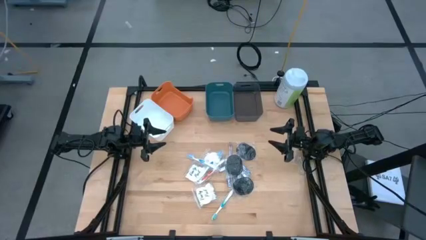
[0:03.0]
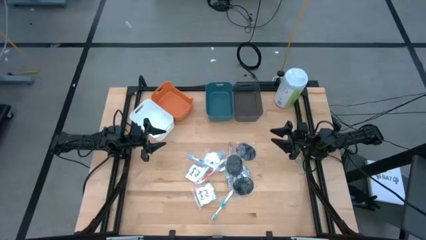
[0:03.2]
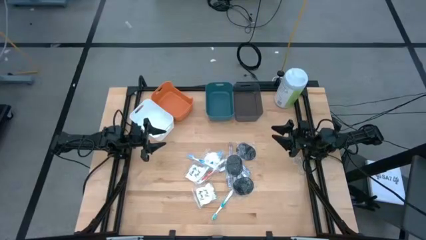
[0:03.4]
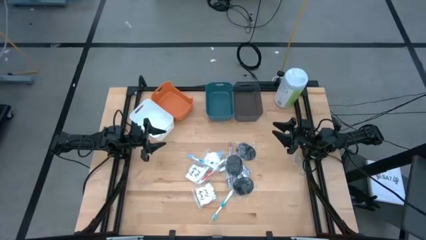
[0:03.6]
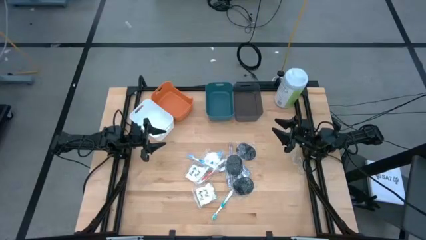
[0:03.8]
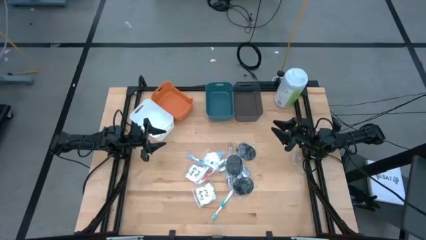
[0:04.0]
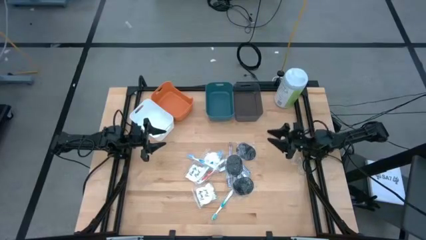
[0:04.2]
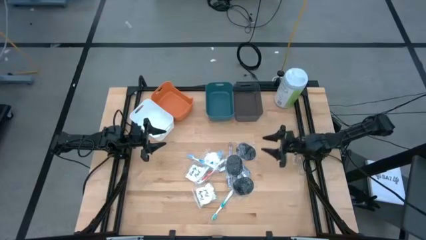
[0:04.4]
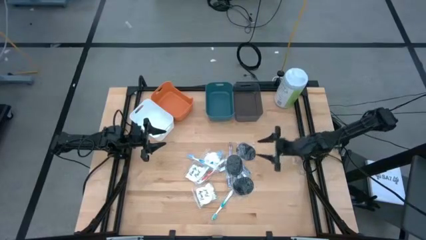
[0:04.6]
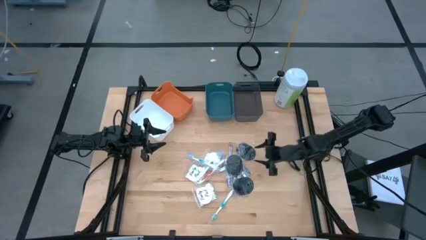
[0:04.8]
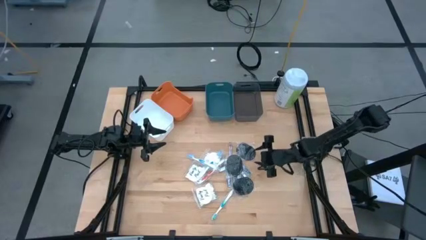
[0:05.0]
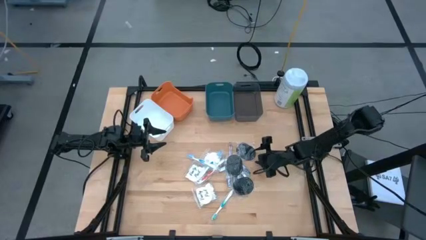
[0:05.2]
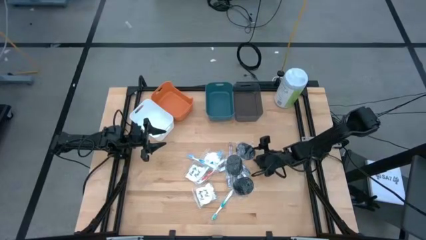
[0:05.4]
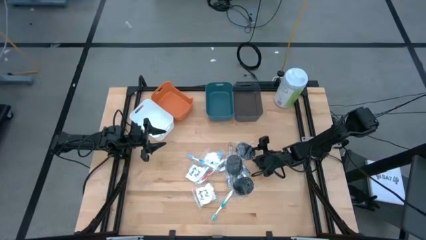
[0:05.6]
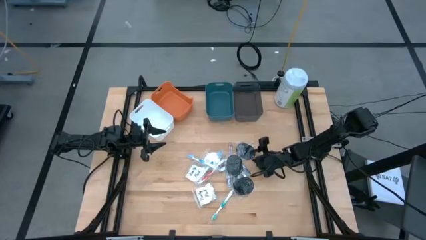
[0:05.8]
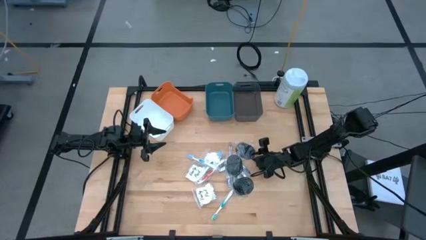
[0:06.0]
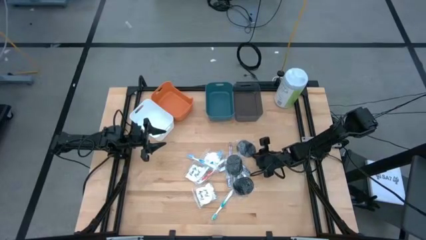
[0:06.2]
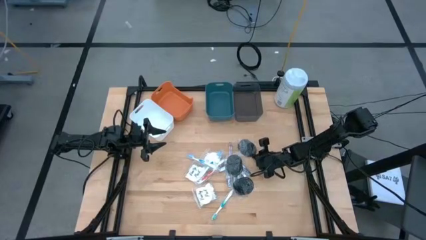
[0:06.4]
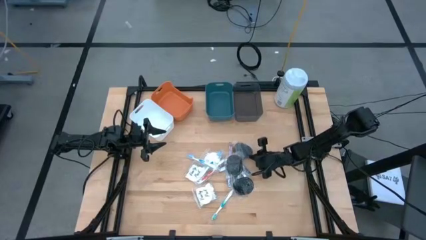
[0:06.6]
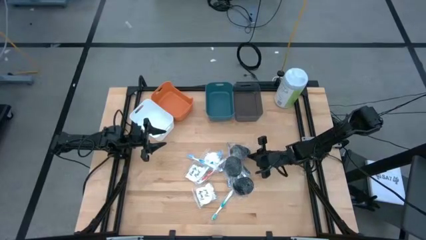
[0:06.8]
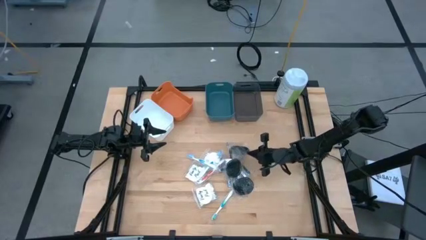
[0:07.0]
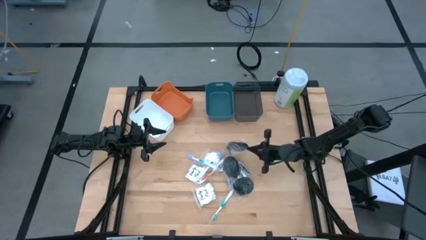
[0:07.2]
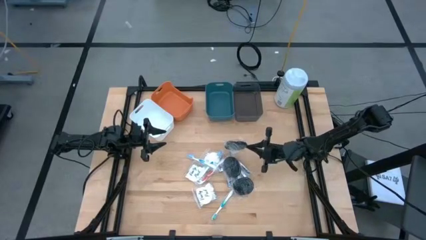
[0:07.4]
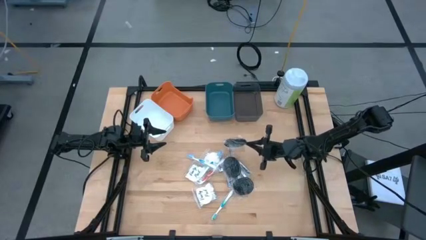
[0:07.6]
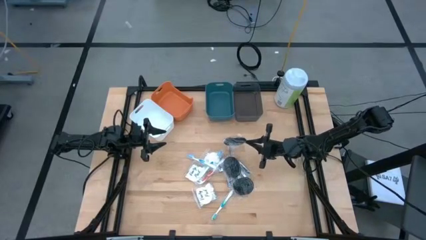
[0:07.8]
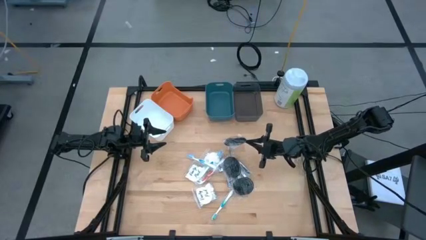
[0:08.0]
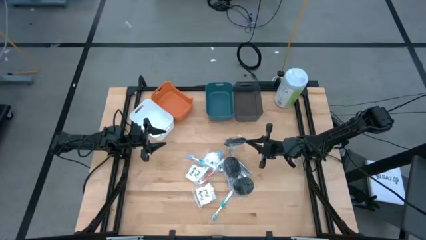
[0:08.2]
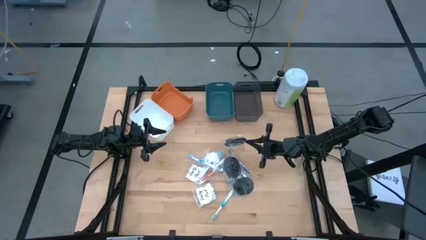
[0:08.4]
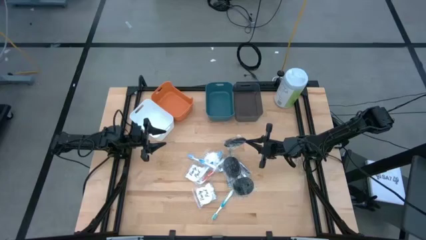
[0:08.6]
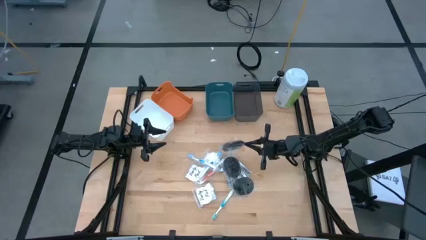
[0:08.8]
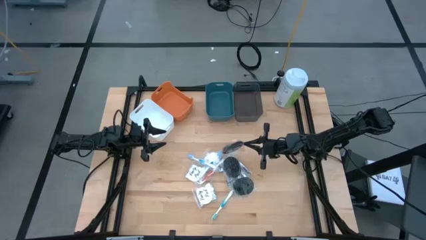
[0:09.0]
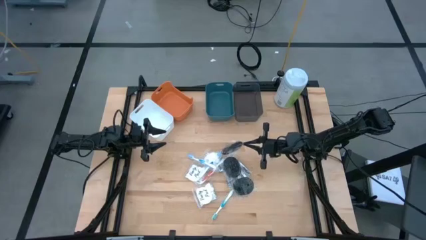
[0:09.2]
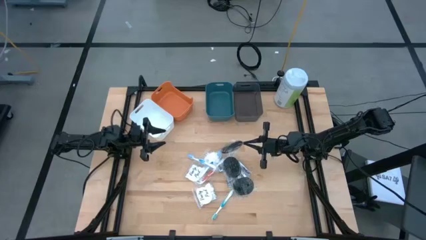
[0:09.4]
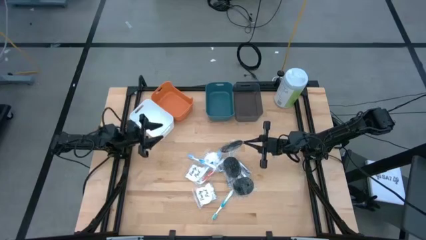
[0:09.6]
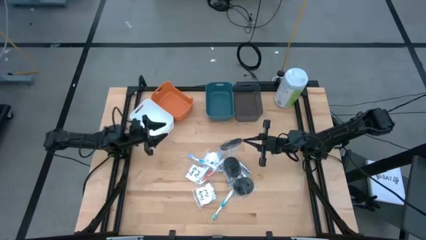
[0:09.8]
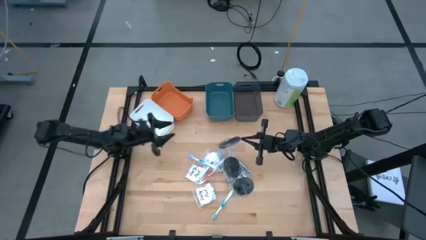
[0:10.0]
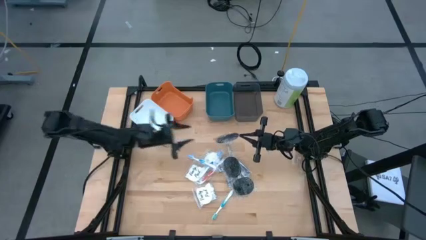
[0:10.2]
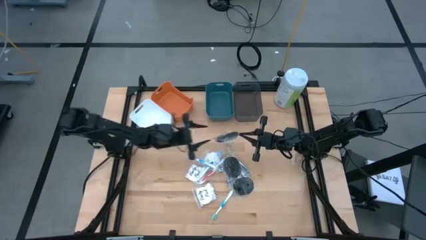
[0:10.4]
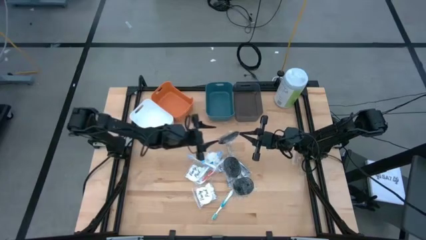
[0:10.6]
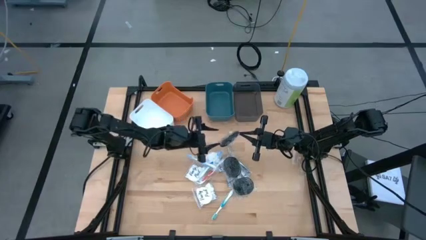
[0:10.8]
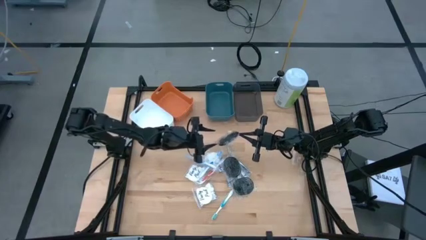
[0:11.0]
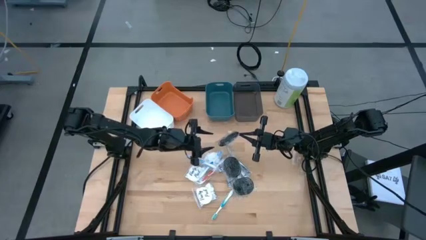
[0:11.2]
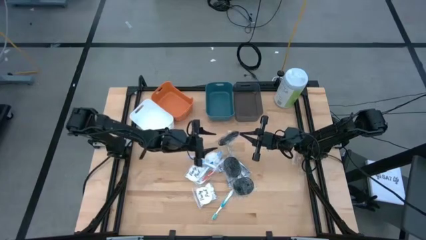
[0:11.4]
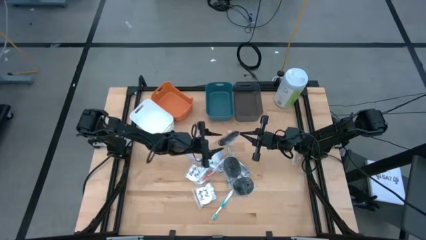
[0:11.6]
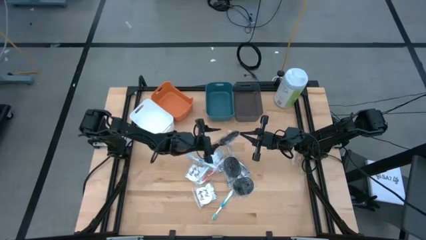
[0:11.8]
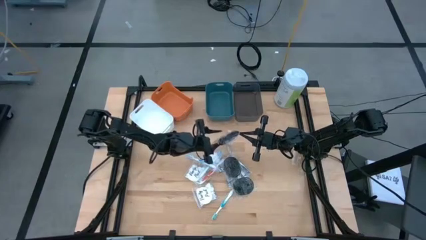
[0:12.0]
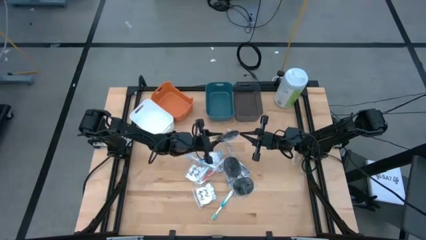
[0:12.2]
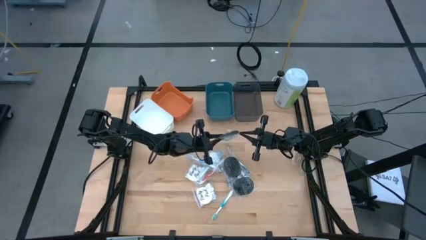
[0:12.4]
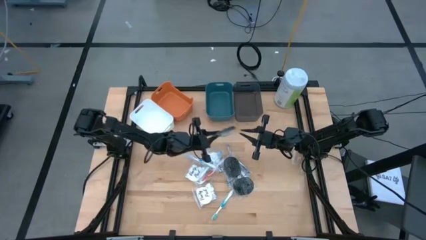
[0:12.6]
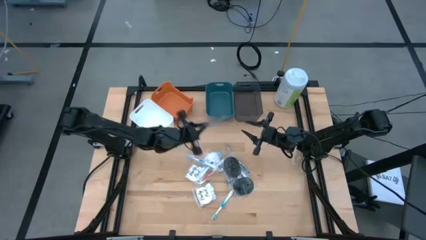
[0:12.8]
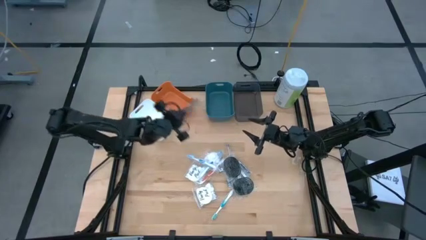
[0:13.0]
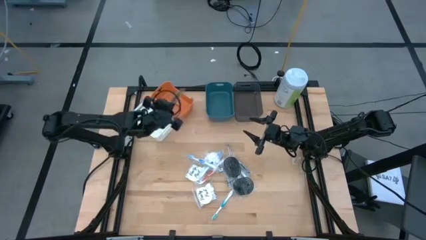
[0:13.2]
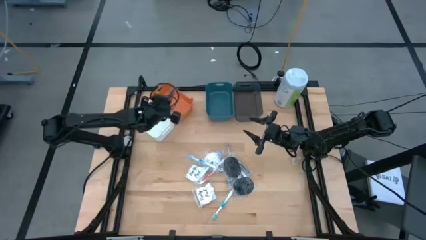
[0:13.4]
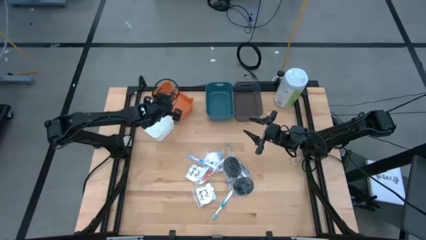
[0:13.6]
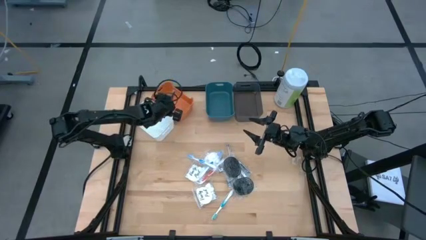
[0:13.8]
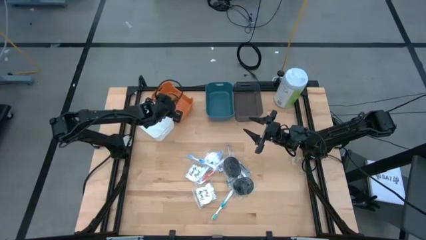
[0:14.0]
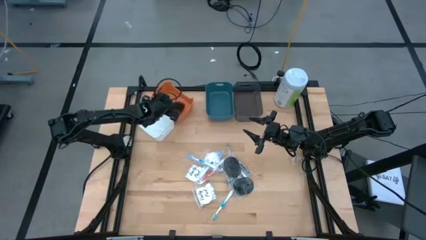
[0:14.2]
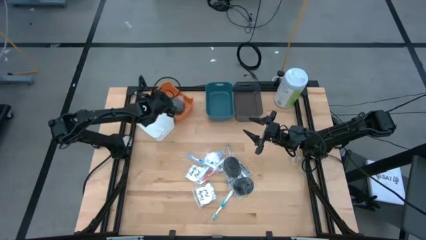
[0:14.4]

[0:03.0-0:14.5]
Task: Pick & Place Travel size toiletries
Put the top black hairbrush into the orange bin

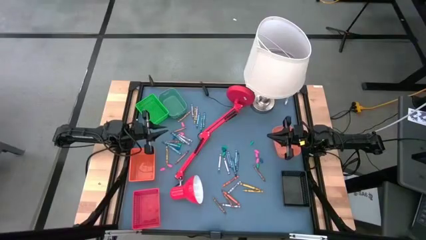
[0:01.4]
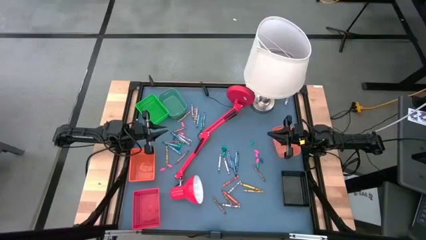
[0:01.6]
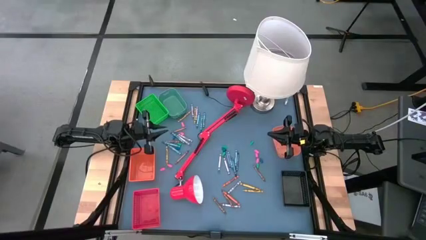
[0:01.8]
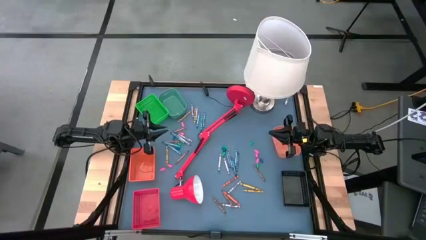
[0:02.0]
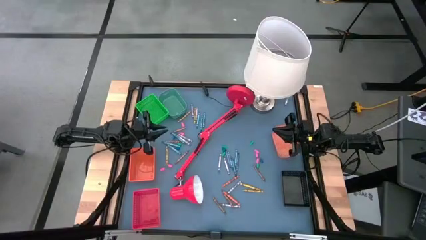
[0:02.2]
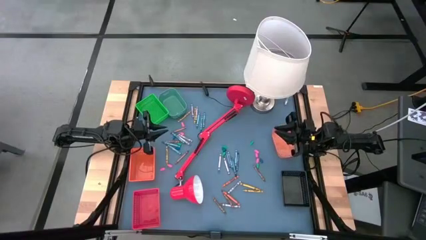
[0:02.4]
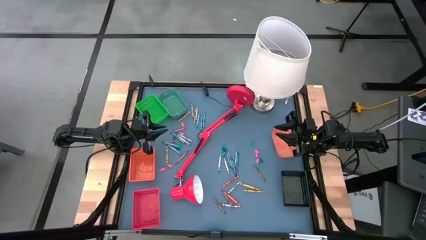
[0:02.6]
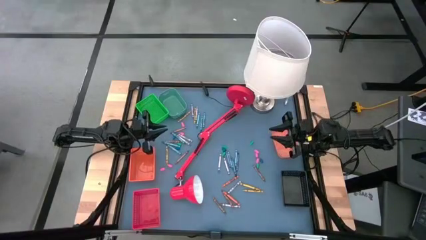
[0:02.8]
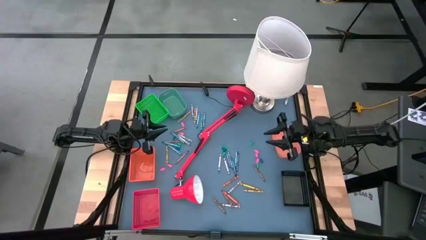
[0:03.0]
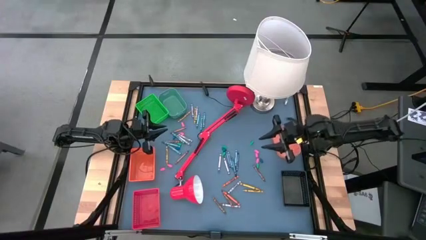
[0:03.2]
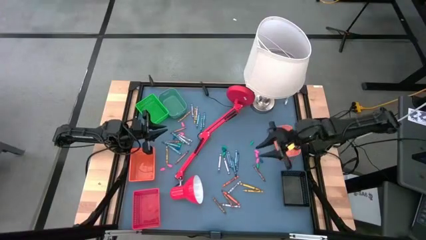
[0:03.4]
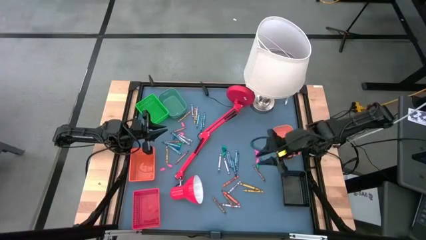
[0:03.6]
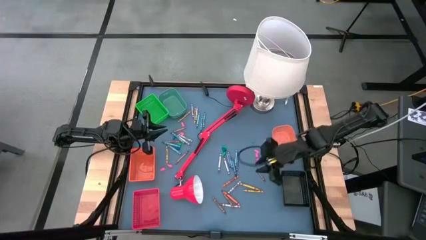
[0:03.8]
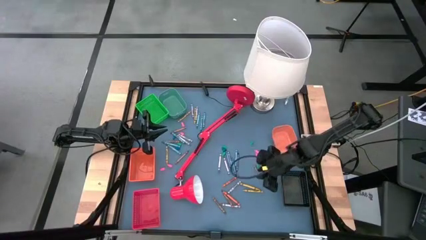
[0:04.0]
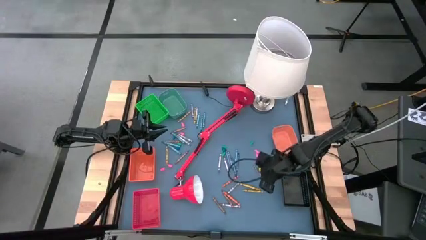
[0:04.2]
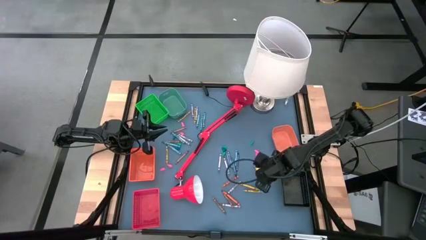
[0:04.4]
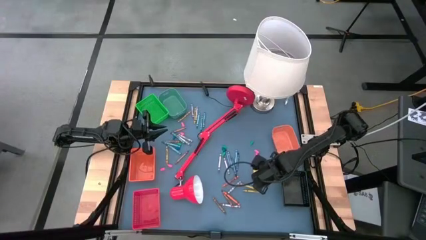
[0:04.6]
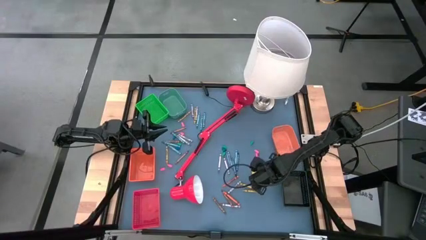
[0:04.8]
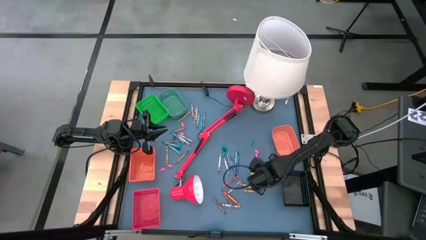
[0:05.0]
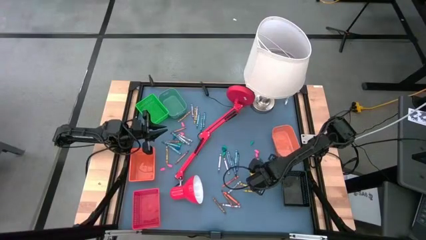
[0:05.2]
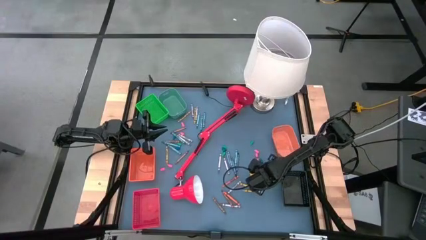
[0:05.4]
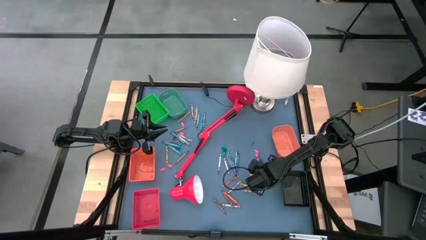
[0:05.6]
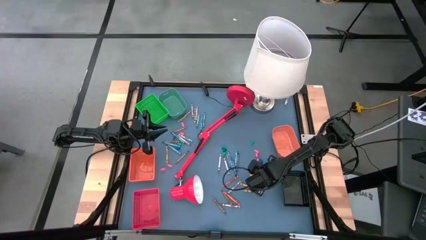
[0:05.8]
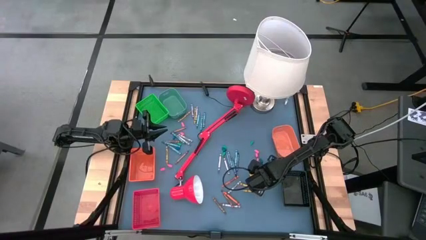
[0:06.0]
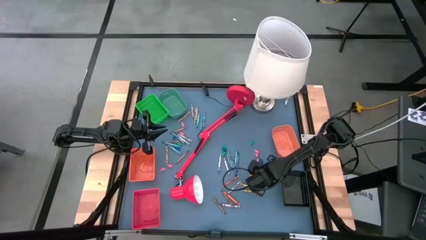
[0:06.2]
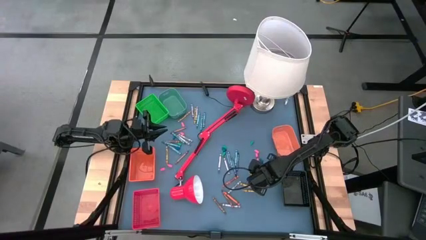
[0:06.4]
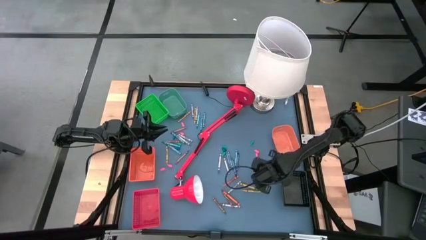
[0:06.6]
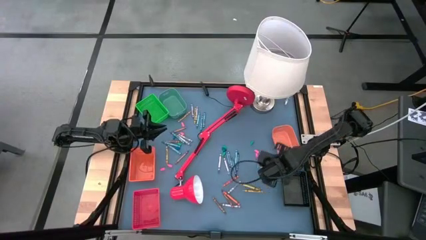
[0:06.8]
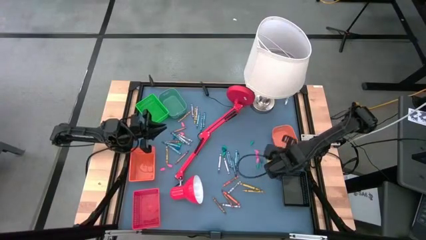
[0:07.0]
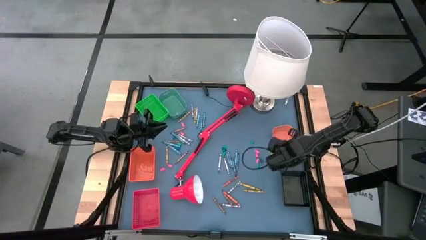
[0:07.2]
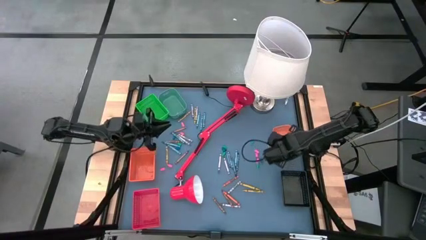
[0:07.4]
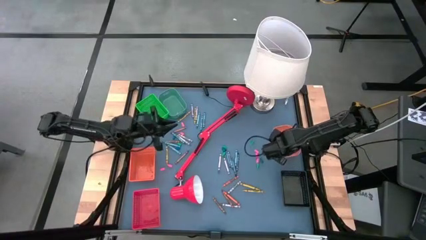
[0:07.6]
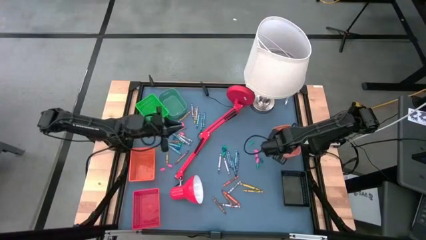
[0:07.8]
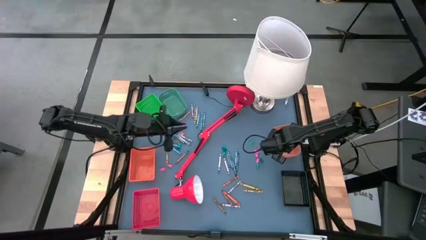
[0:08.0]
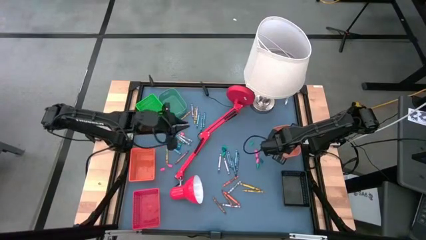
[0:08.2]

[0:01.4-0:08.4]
Task: Sort crayons
Put the brown crayon into the right orange bin
